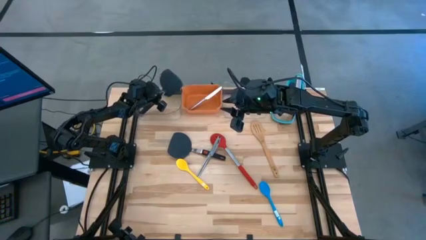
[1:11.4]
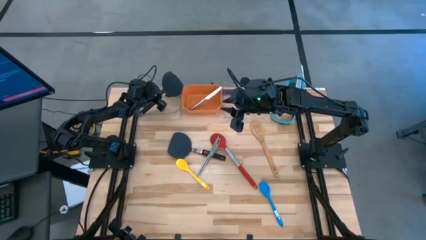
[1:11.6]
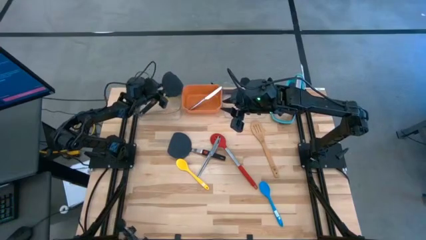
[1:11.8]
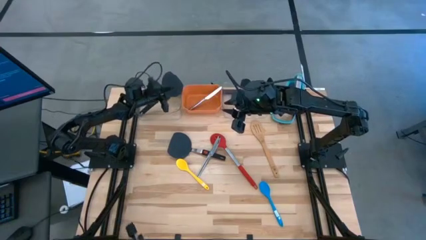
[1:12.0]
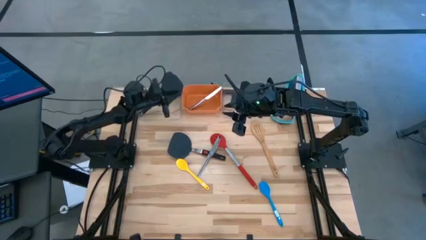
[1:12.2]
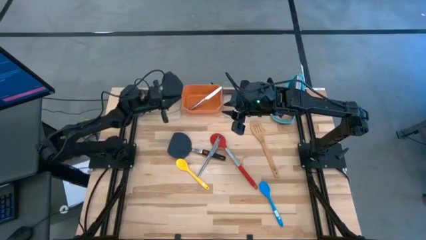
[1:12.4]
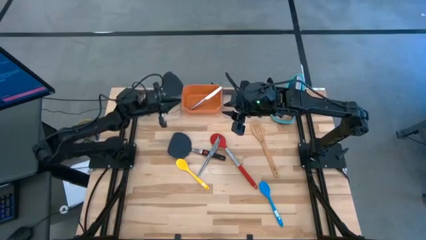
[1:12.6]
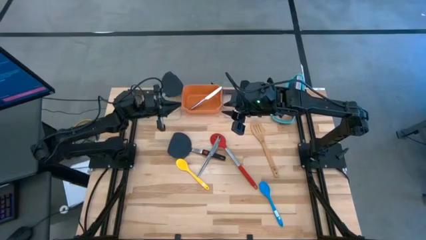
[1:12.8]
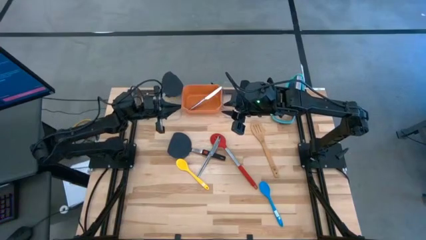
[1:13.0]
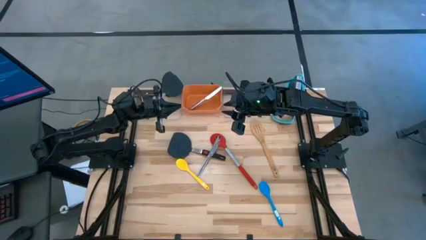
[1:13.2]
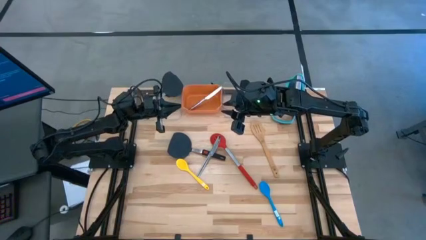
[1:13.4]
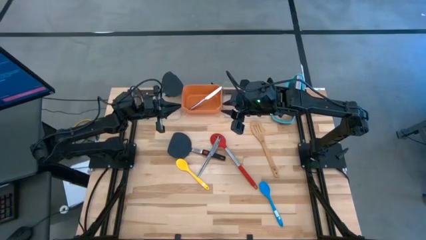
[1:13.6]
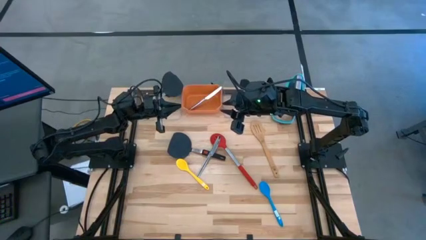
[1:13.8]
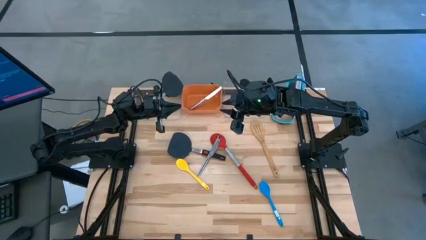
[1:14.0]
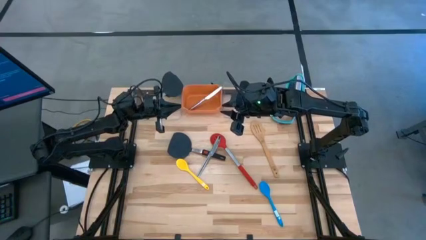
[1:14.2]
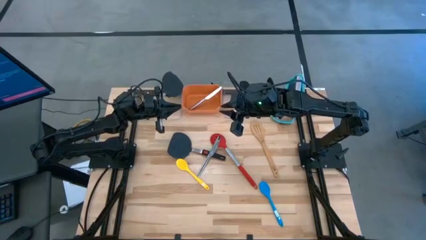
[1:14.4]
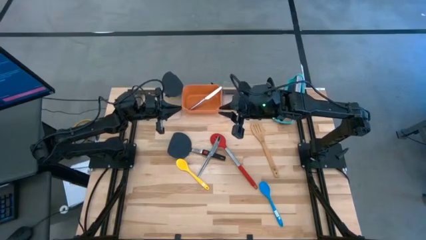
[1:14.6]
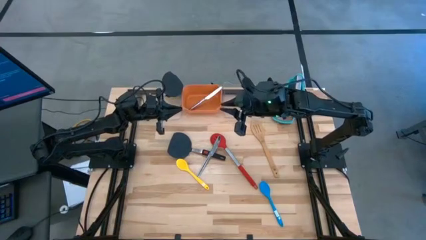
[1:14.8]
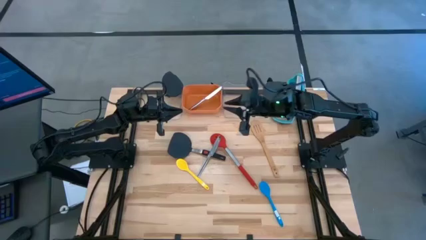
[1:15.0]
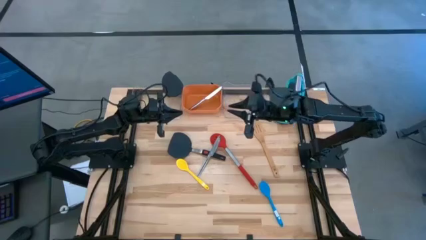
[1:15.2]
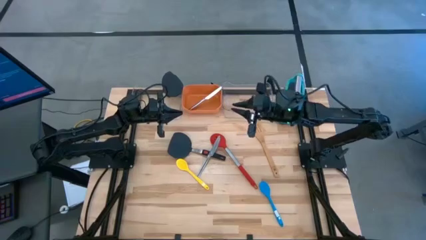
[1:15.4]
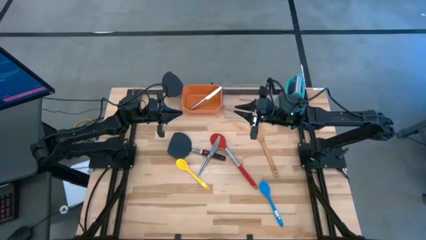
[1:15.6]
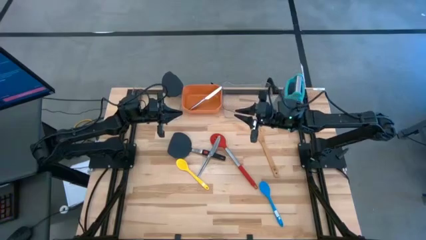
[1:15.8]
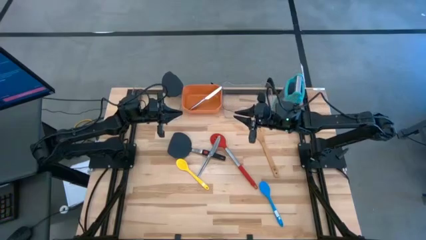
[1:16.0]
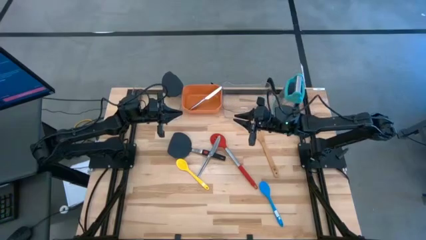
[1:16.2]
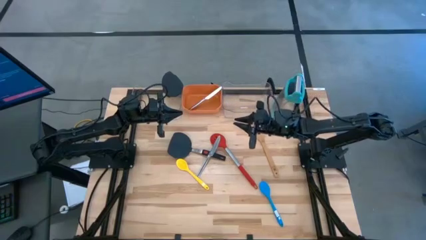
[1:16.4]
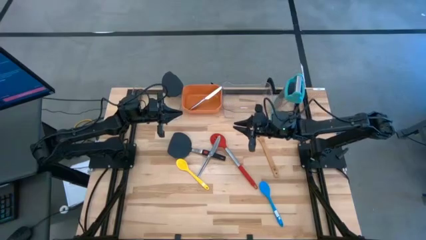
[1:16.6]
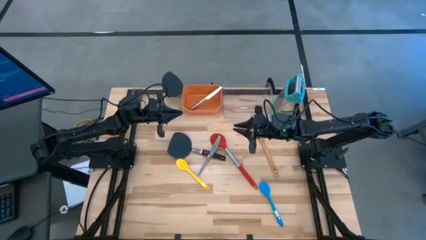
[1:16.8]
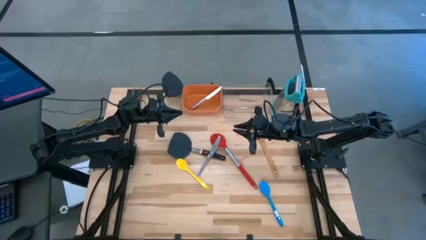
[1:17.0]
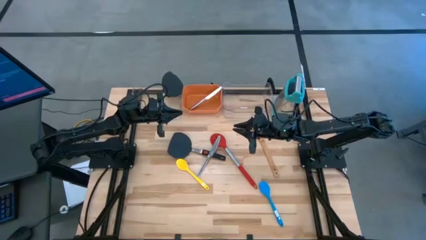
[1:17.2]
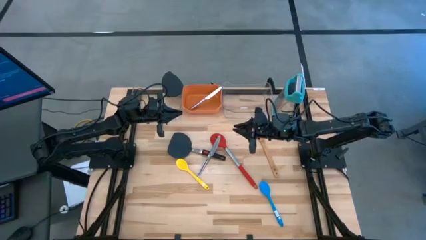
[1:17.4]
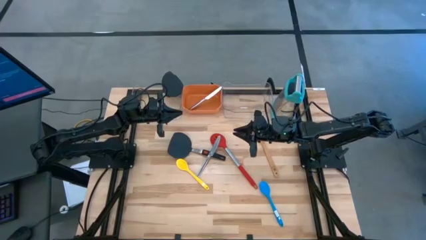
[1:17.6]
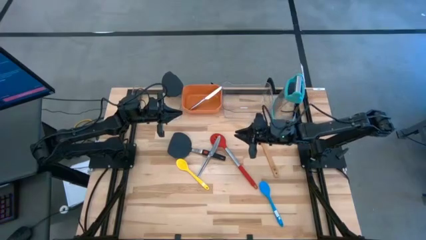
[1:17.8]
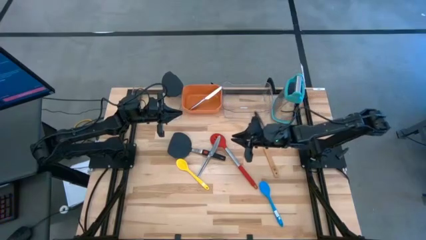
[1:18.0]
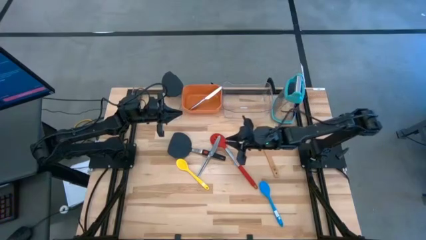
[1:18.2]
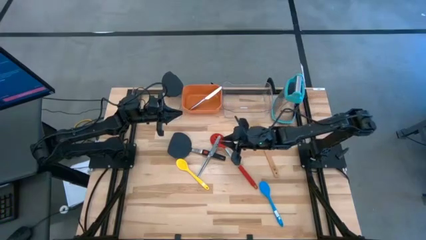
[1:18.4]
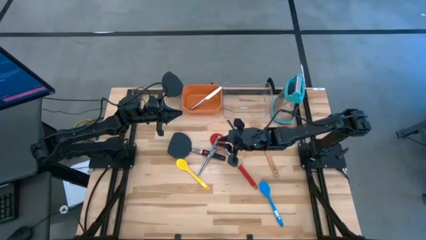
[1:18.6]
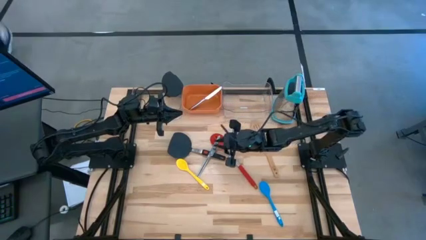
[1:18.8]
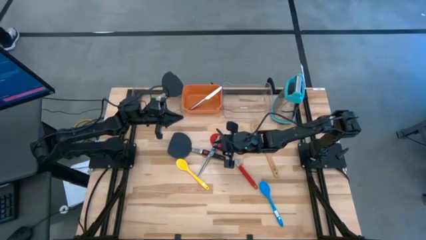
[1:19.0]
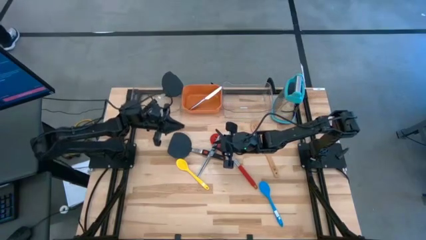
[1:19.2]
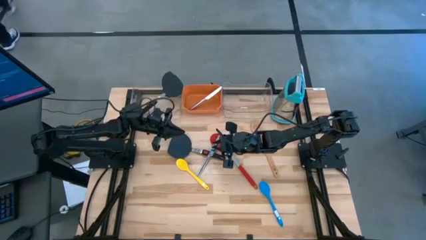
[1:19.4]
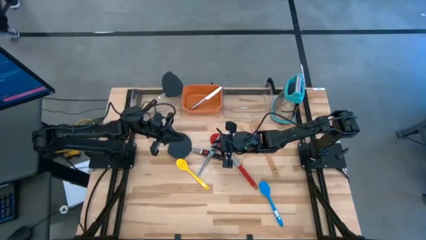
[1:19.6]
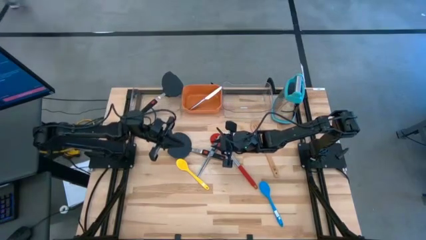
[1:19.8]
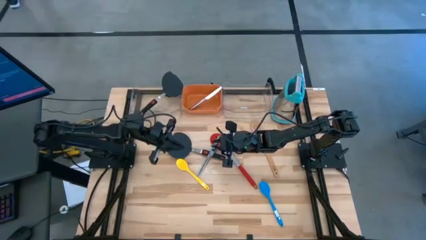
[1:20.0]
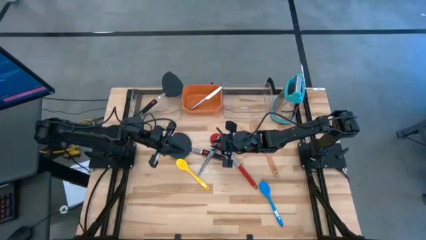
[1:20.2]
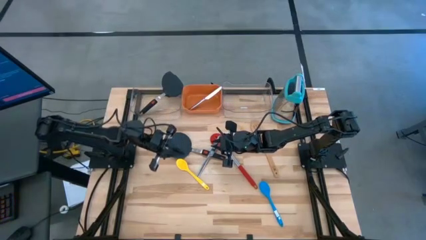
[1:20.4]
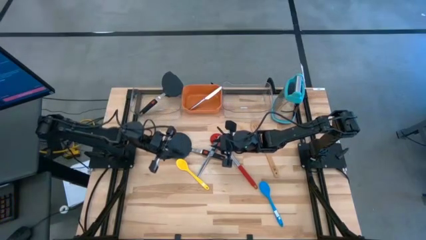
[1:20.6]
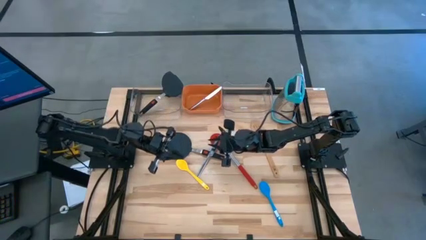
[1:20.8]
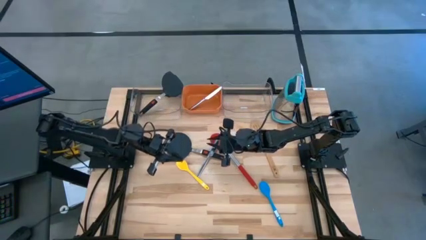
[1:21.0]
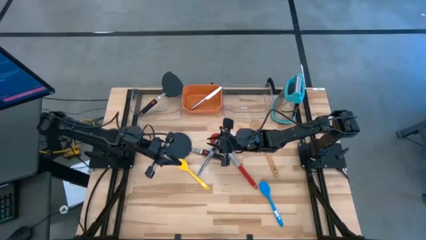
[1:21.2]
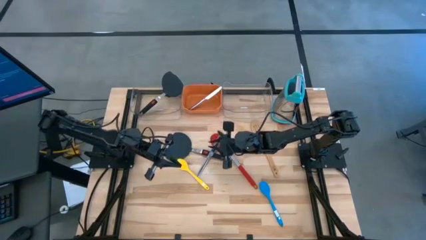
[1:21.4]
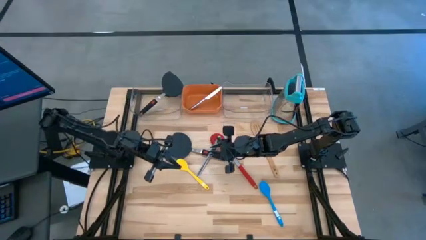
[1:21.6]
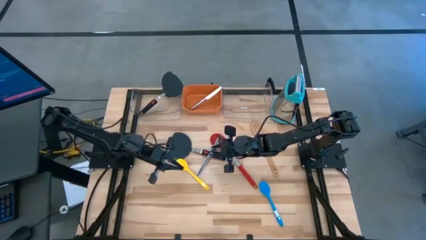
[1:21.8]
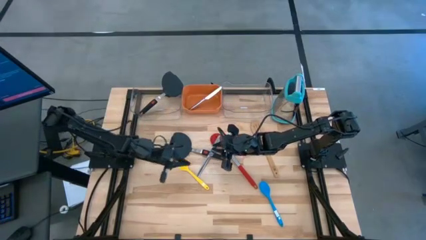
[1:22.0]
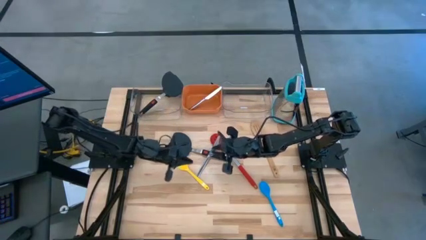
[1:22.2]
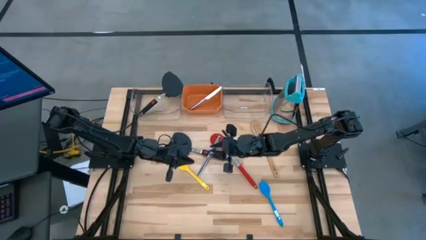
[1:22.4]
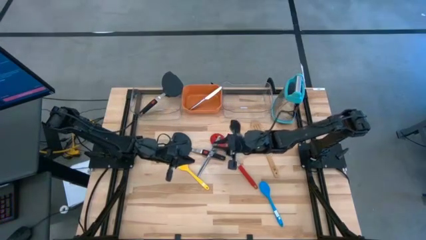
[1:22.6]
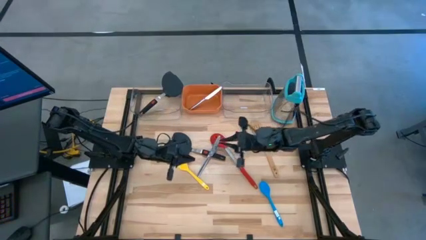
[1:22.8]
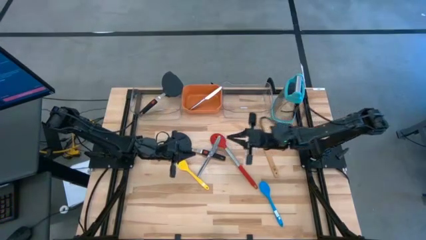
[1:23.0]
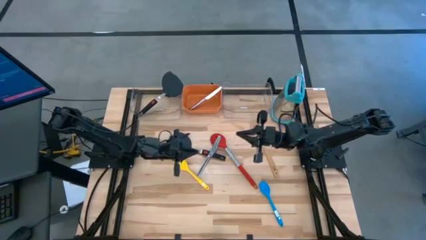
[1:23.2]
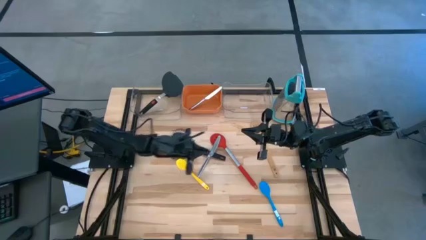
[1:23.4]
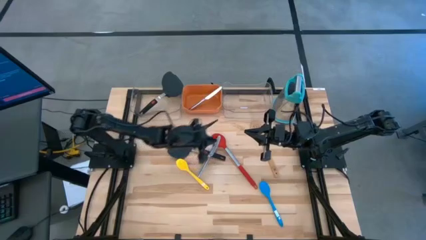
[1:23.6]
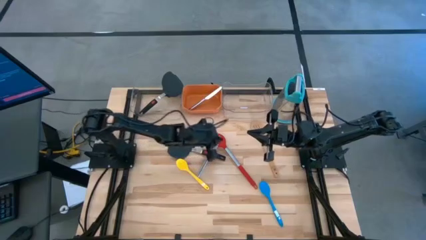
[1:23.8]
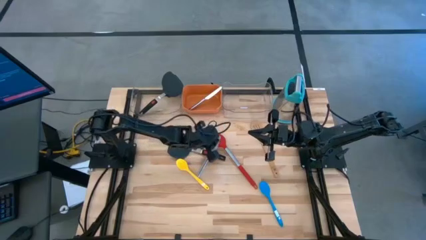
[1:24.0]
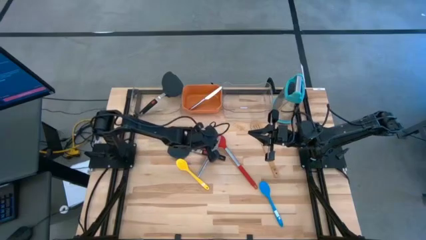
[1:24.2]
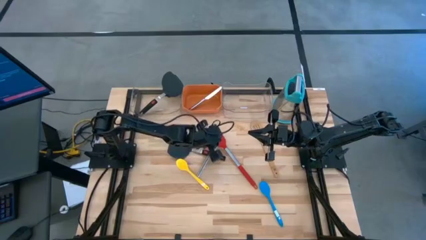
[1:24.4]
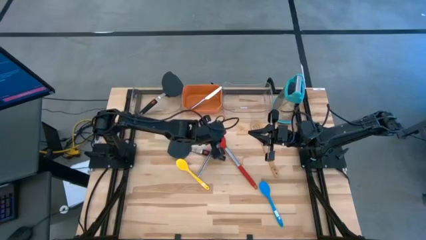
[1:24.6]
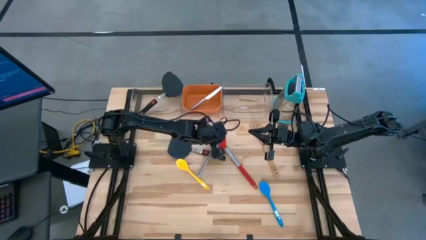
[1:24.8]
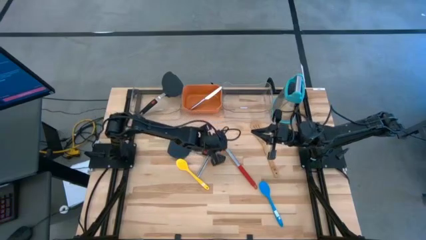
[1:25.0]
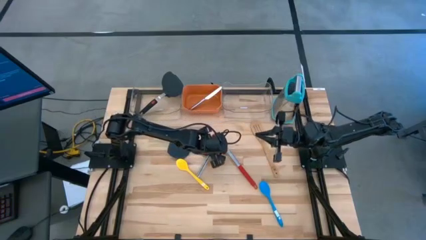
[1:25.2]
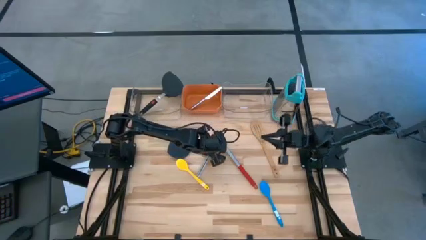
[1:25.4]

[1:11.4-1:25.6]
Task: Pick & Place Kitchen Items
Put the silver table knife into the orange bin
